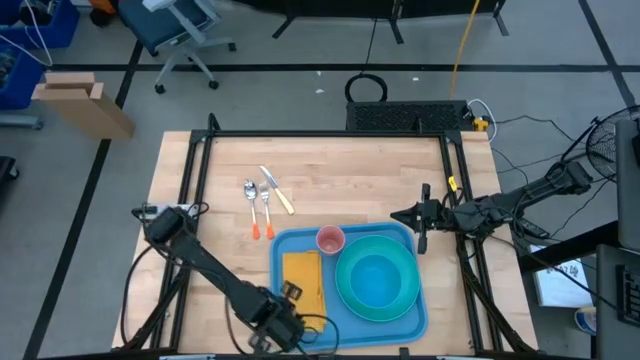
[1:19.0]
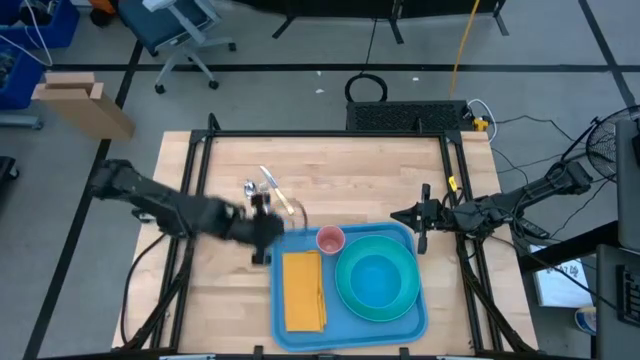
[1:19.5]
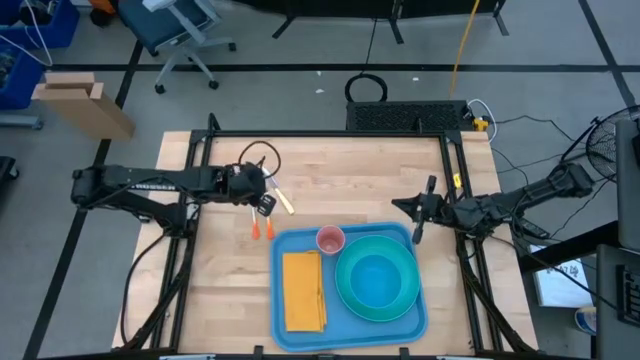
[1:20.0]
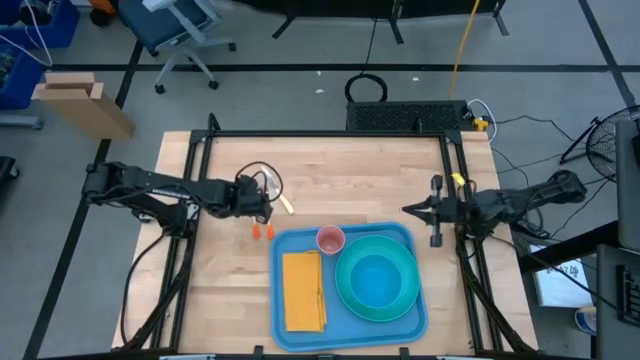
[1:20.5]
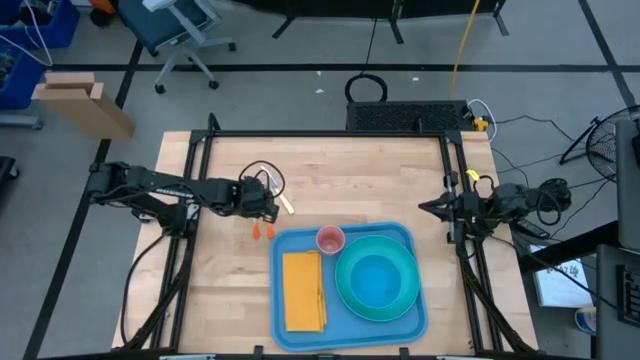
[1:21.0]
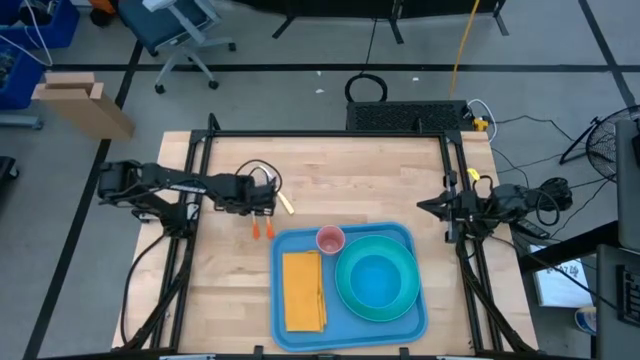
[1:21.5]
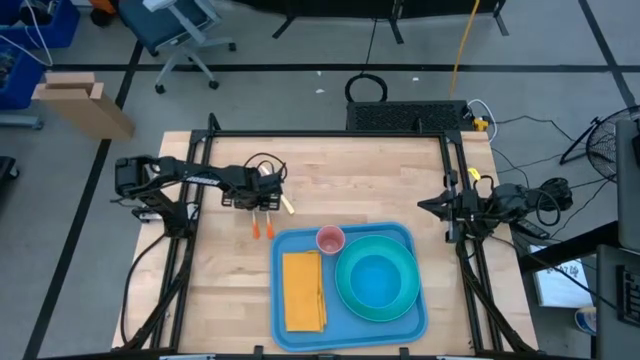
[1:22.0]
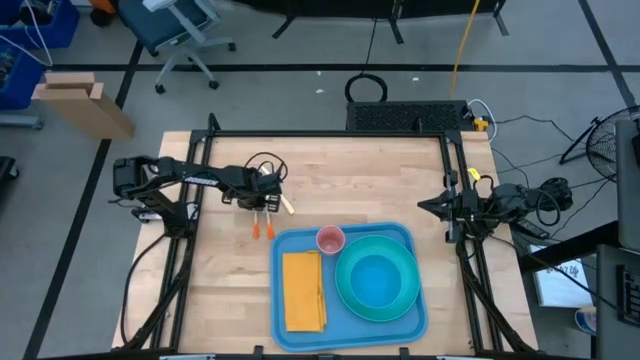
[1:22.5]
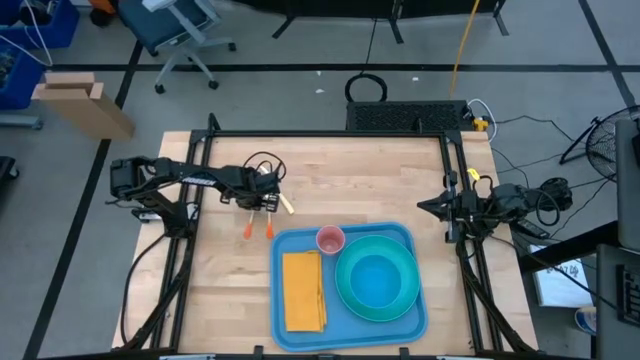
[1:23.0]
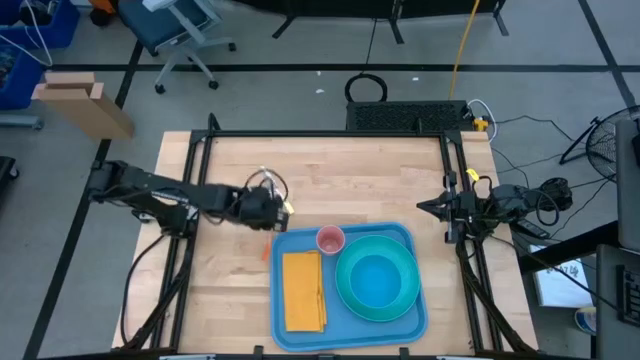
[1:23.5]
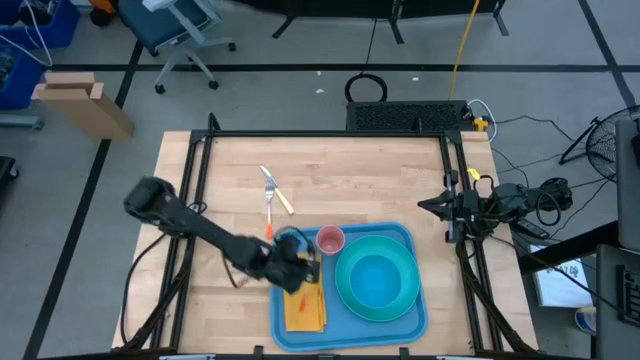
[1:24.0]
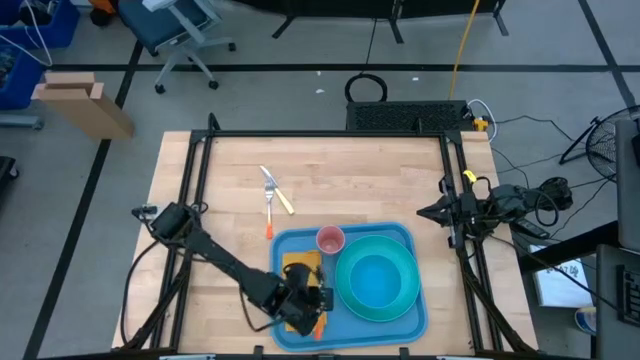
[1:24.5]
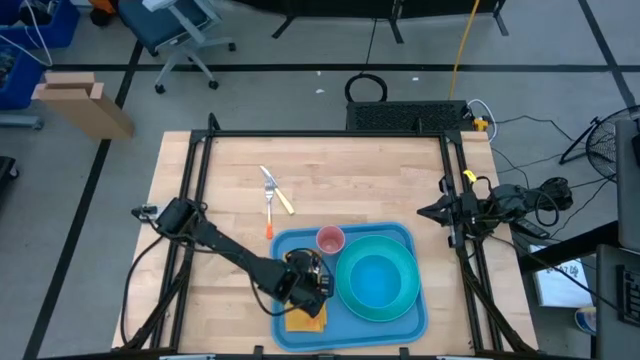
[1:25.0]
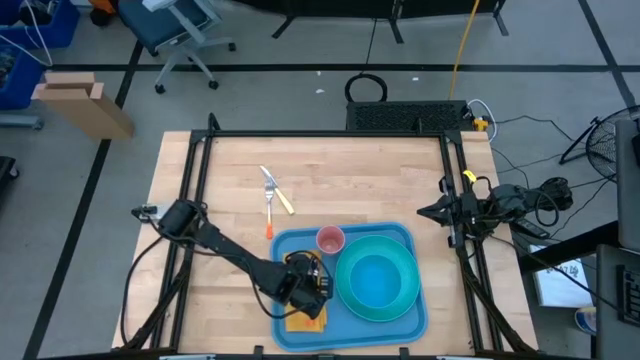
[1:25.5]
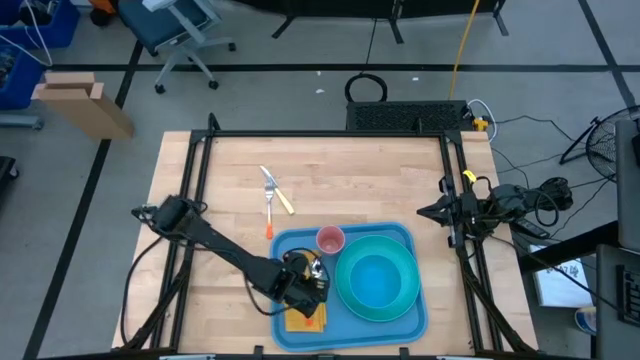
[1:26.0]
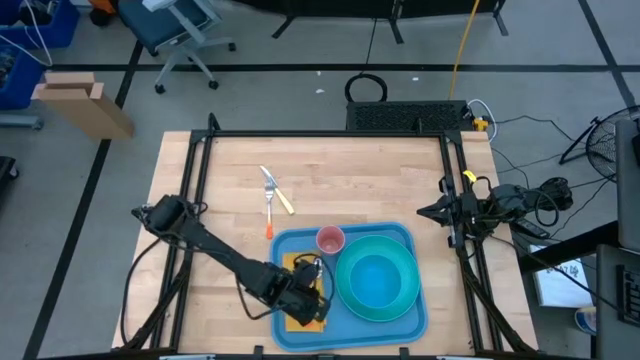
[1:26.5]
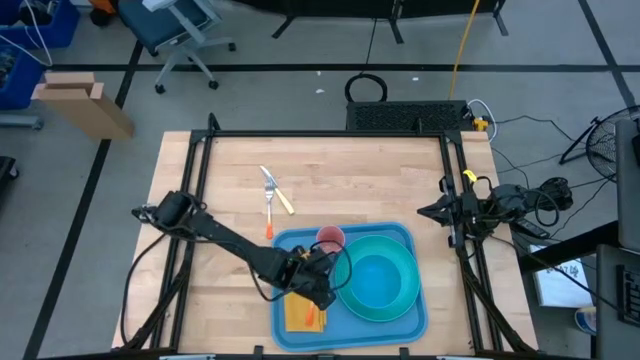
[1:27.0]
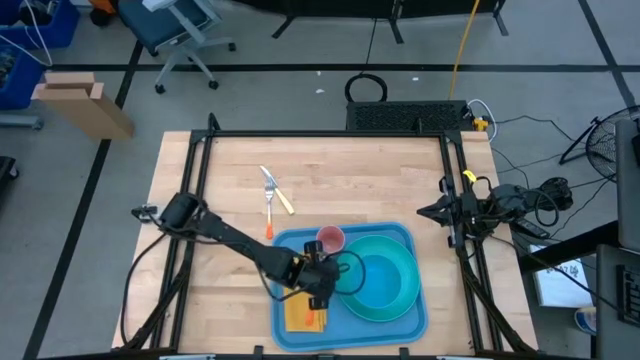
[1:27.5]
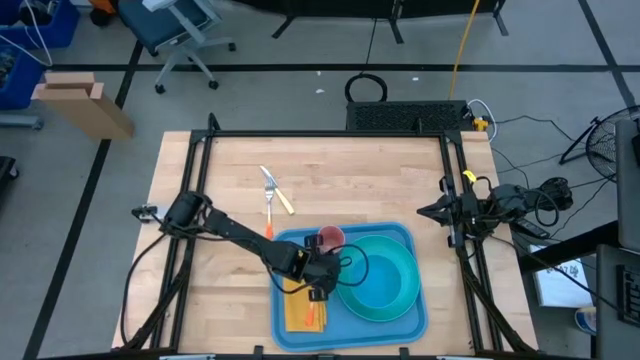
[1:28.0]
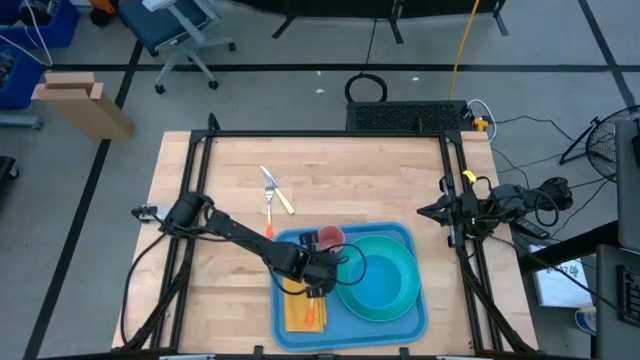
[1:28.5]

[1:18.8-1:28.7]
Task: Set up tray
Put the orange spoon on the yellow napkin on the blue serving tray

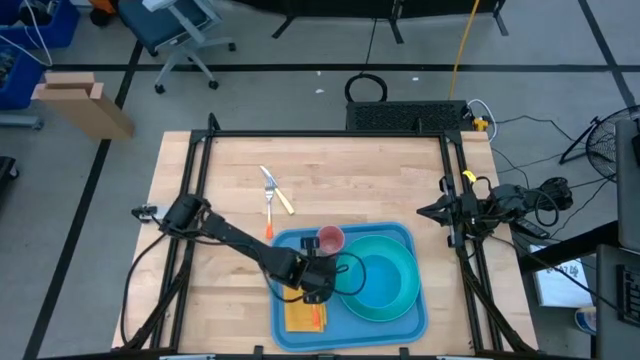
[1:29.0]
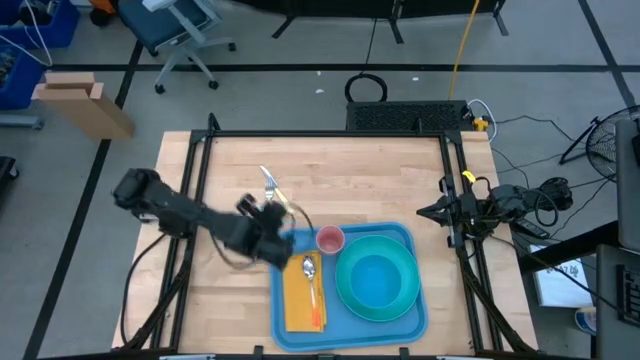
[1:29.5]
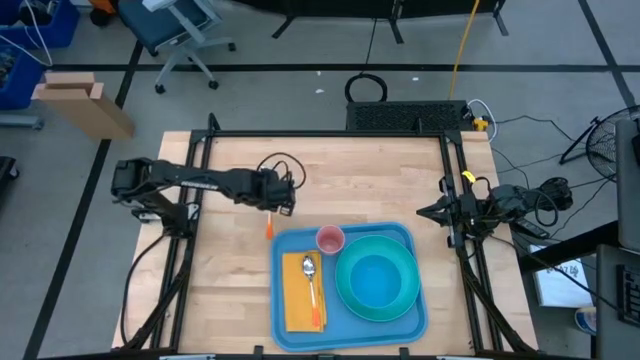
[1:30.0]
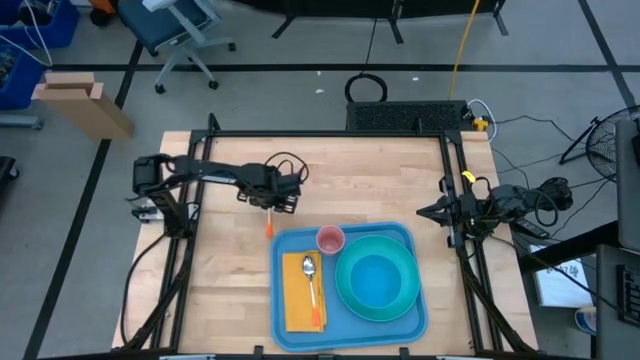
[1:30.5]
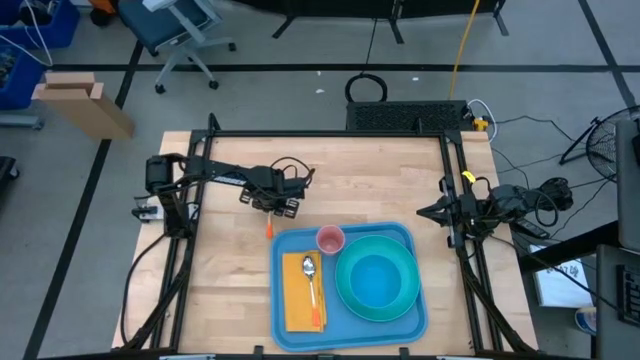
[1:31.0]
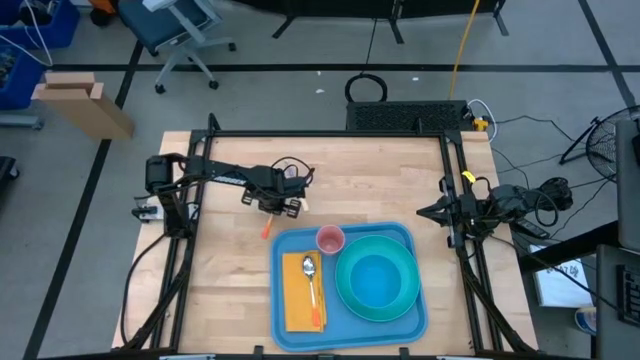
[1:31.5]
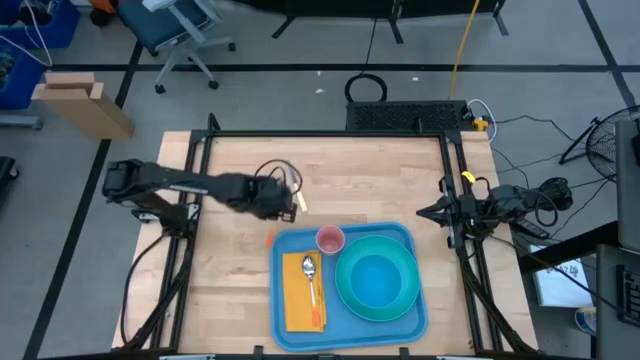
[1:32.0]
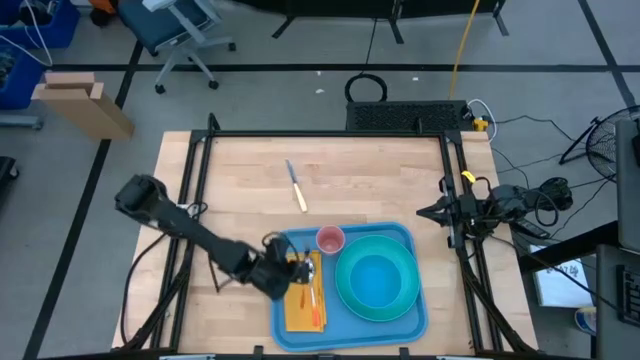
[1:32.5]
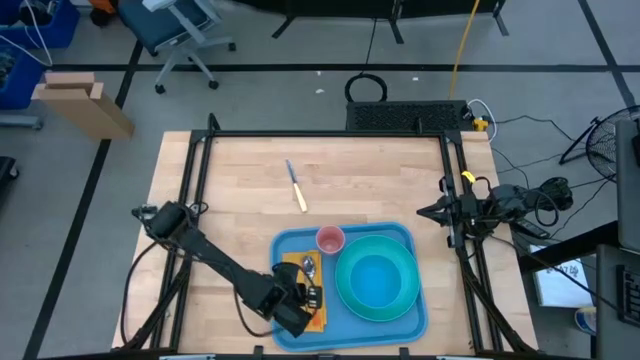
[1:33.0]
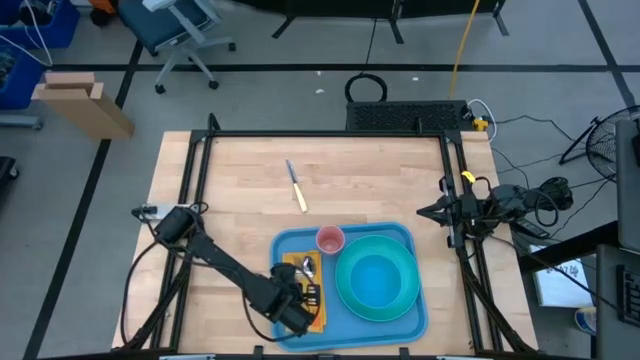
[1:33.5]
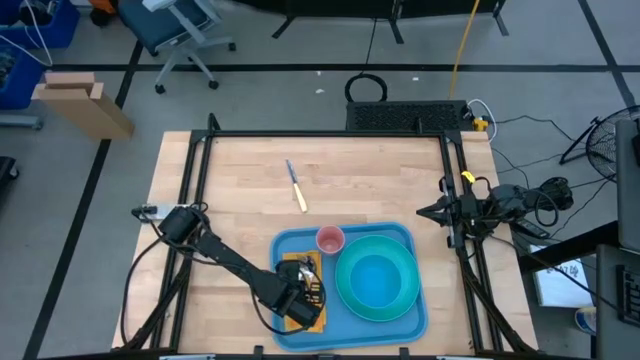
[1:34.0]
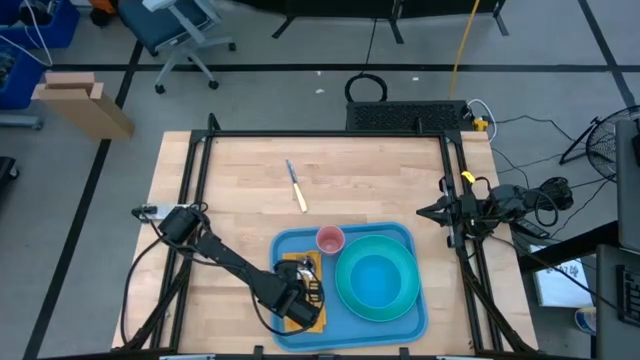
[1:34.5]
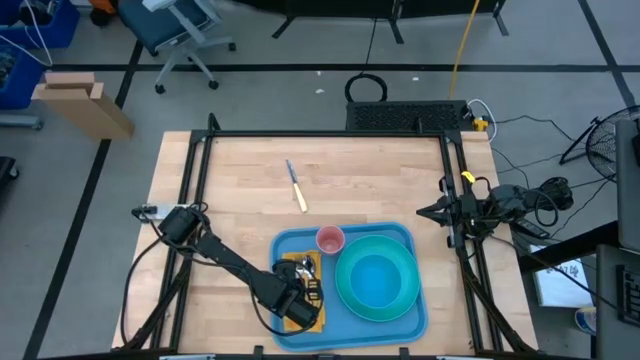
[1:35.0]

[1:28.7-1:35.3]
Put the orange fork on the yellow napkin on the blue serving tray

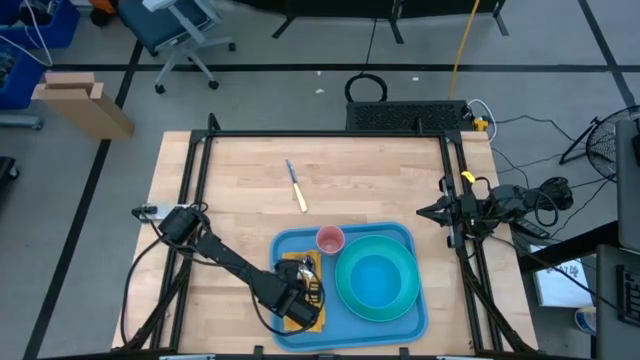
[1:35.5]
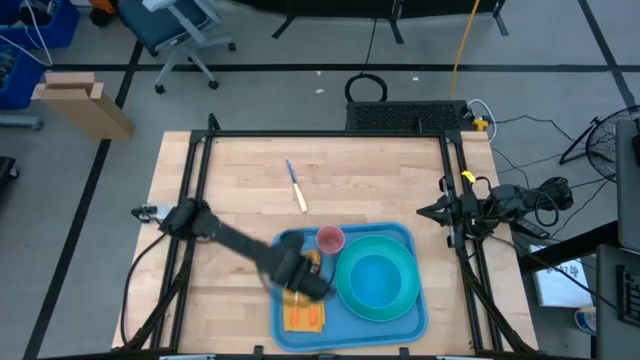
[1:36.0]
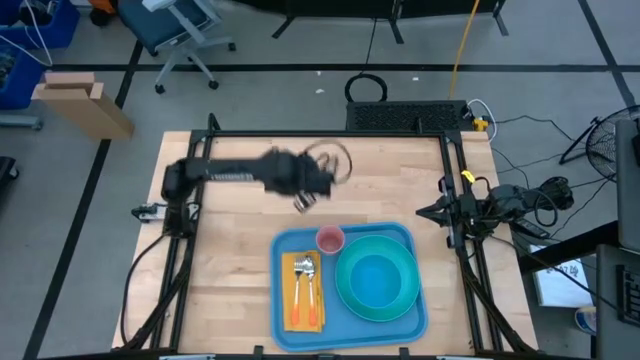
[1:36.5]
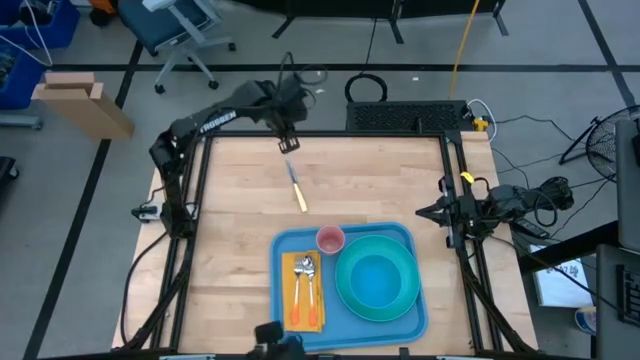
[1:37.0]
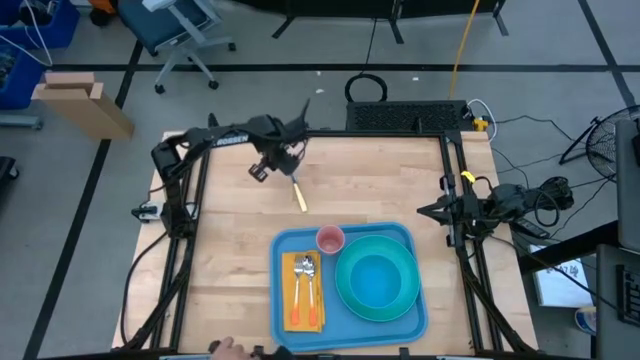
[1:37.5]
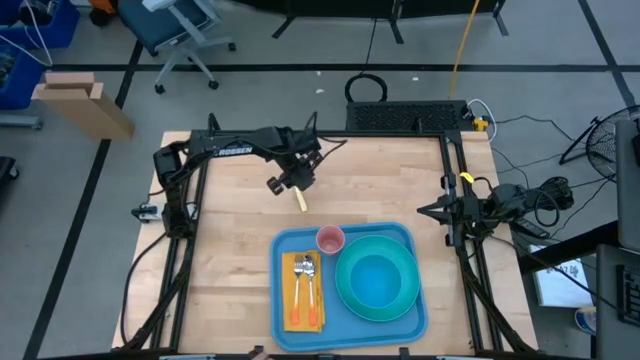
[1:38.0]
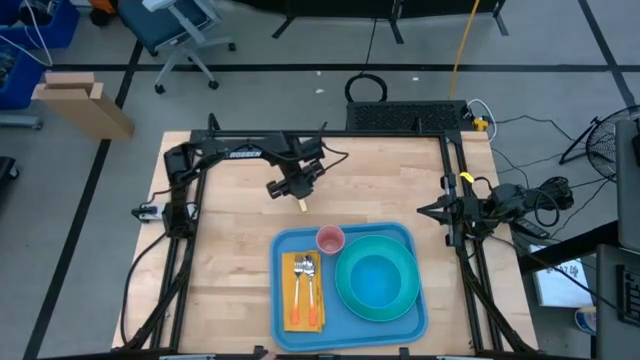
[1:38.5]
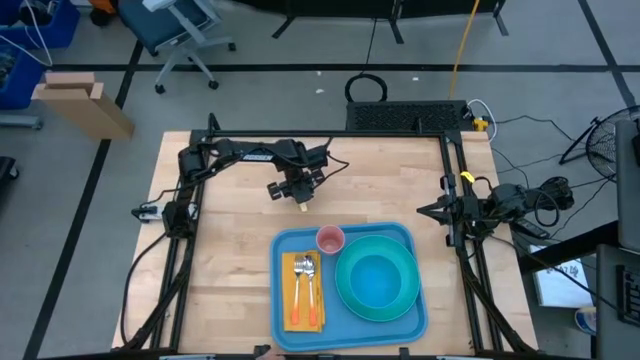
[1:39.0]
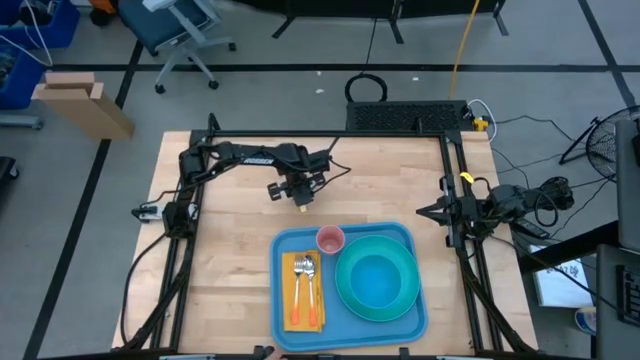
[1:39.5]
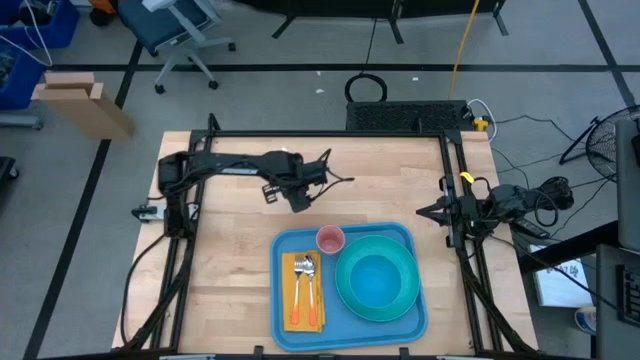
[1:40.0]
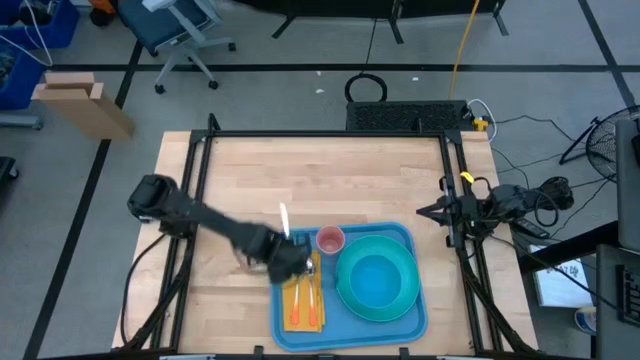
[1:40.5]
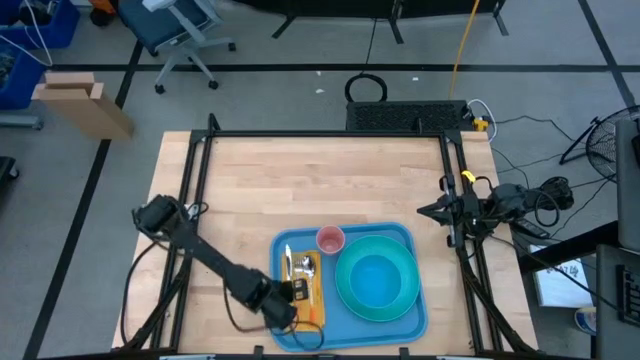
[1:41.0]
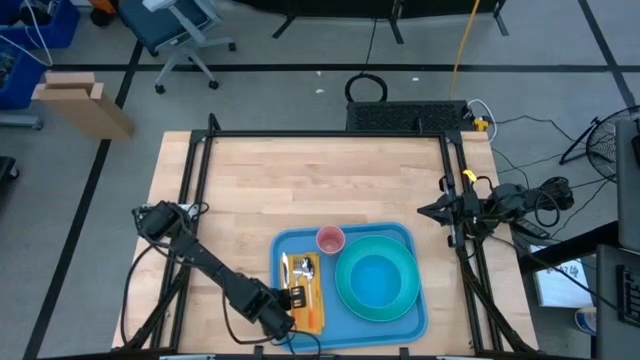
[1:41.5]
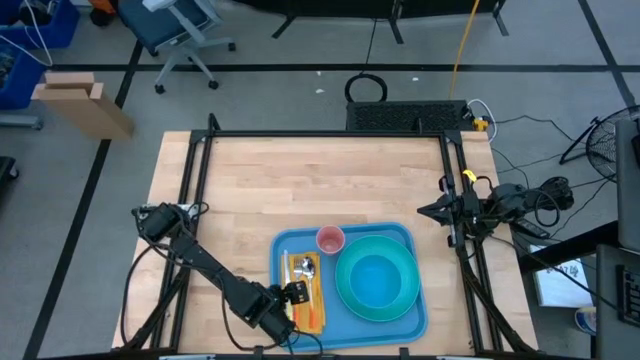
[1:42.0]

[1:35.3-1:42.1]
Put the yellow knife on the yellow napkin on the blue serving tray
